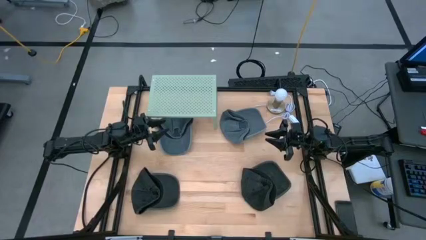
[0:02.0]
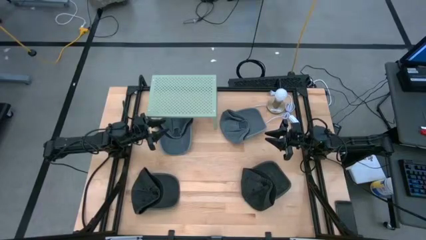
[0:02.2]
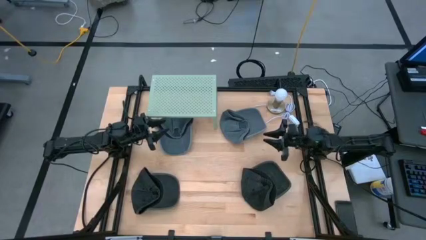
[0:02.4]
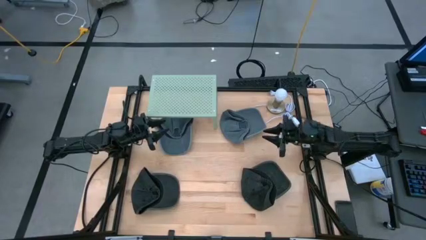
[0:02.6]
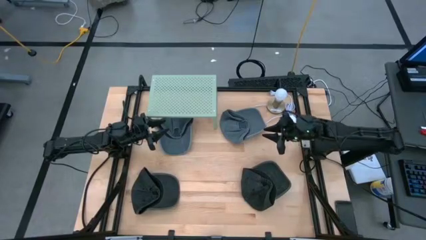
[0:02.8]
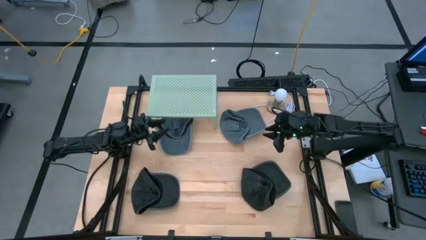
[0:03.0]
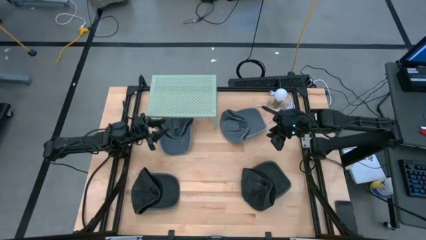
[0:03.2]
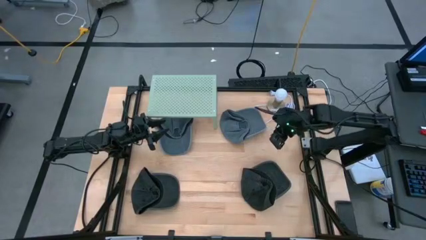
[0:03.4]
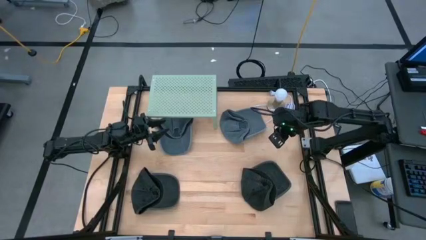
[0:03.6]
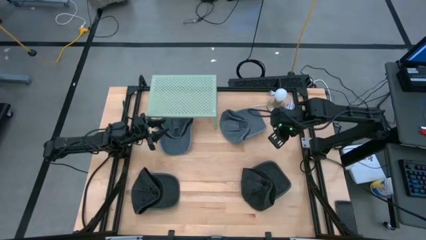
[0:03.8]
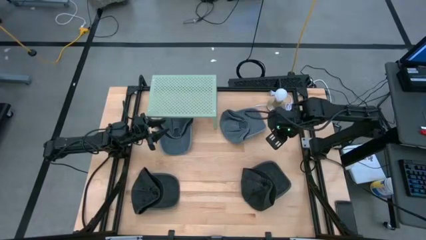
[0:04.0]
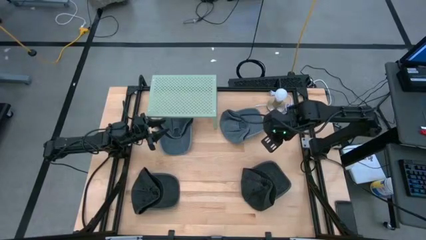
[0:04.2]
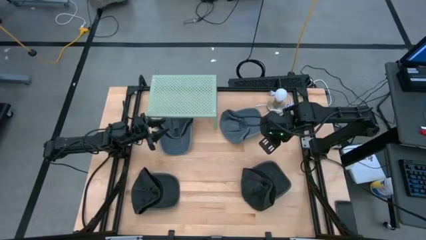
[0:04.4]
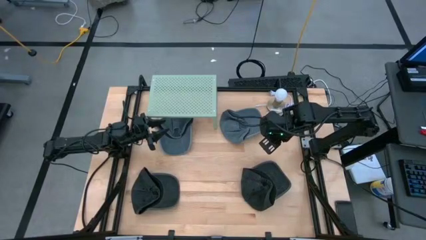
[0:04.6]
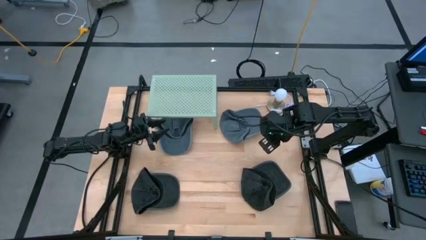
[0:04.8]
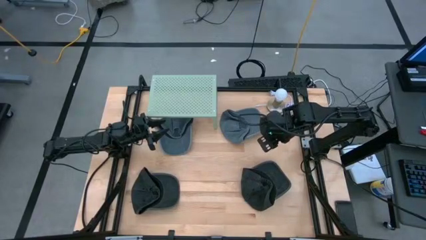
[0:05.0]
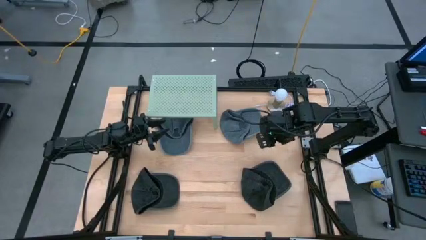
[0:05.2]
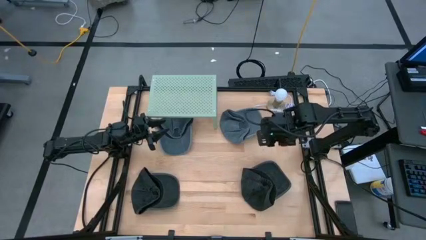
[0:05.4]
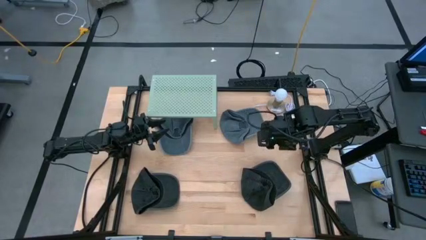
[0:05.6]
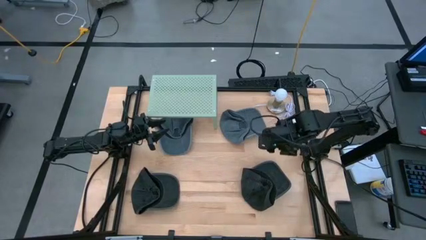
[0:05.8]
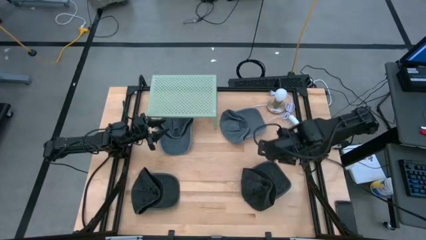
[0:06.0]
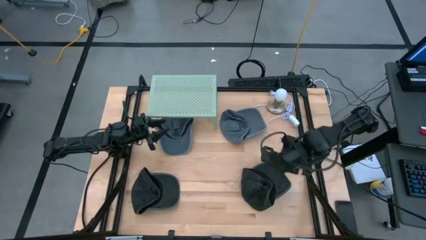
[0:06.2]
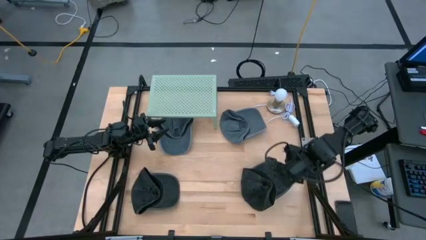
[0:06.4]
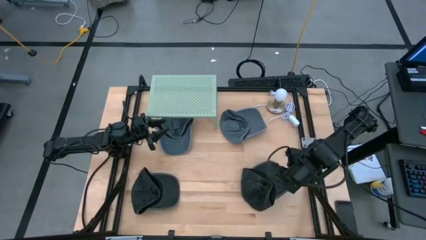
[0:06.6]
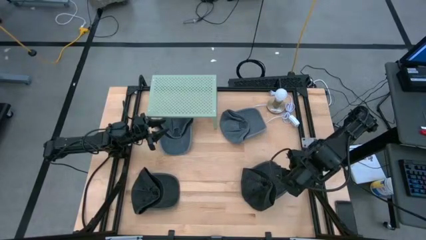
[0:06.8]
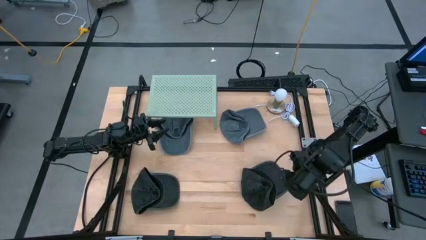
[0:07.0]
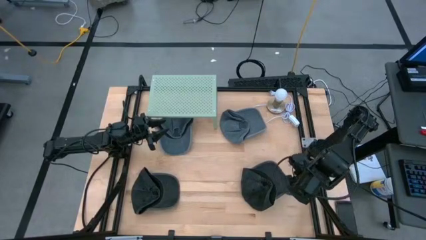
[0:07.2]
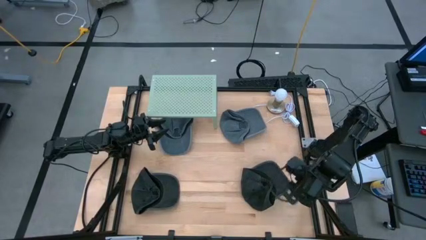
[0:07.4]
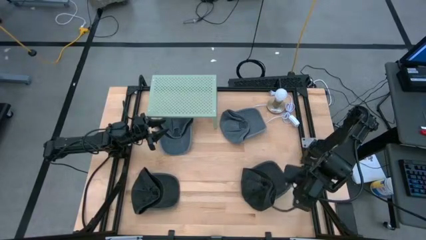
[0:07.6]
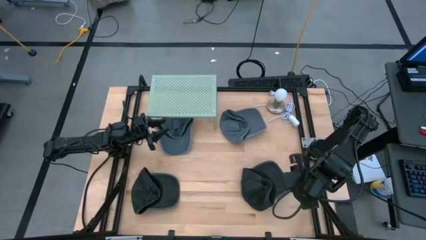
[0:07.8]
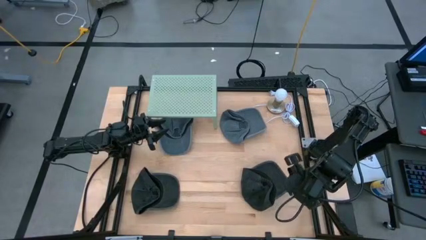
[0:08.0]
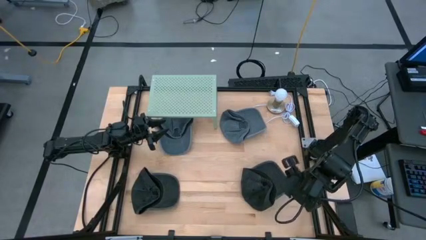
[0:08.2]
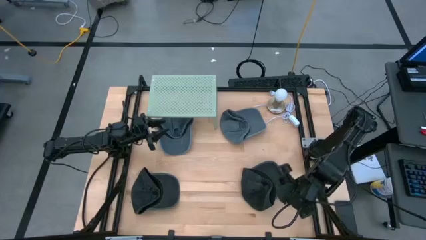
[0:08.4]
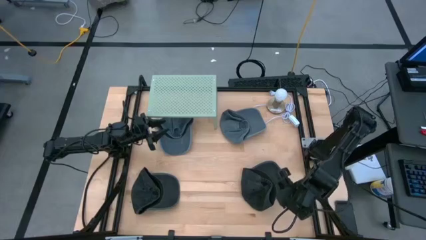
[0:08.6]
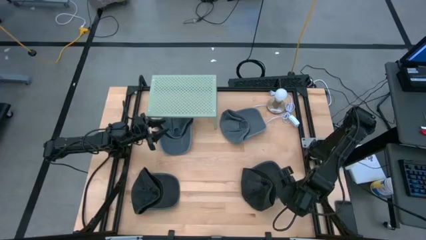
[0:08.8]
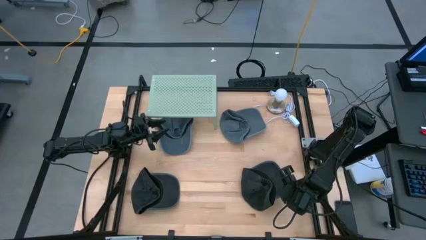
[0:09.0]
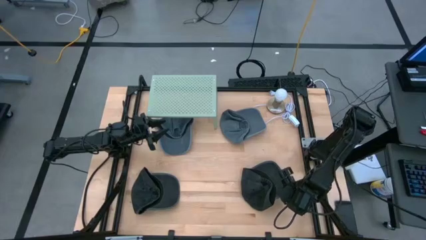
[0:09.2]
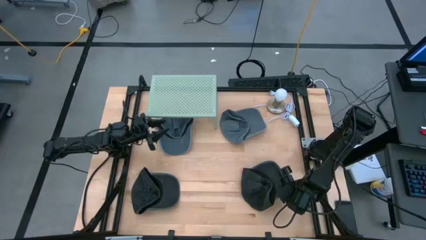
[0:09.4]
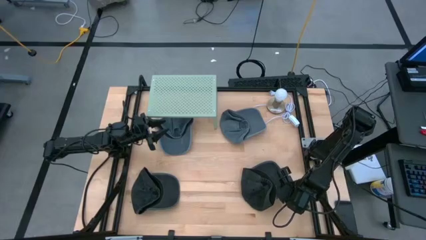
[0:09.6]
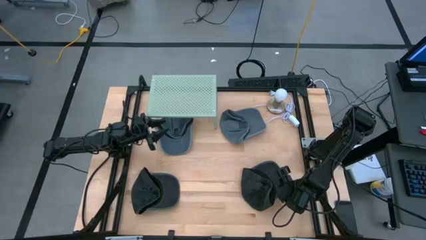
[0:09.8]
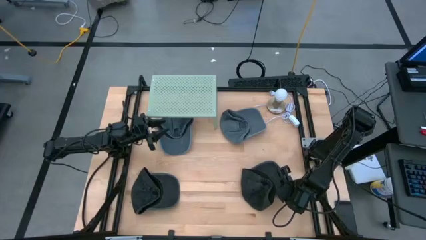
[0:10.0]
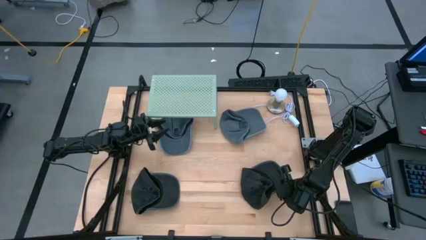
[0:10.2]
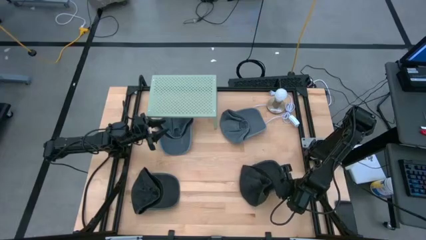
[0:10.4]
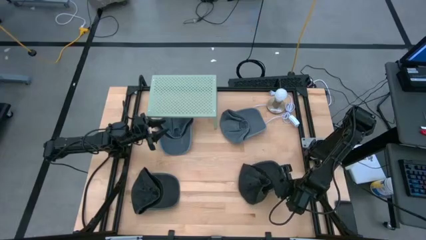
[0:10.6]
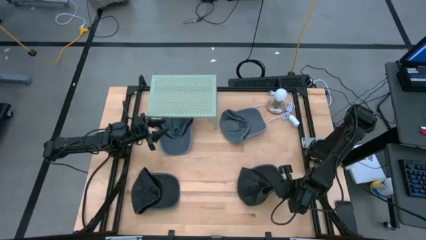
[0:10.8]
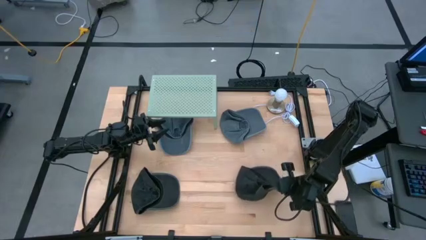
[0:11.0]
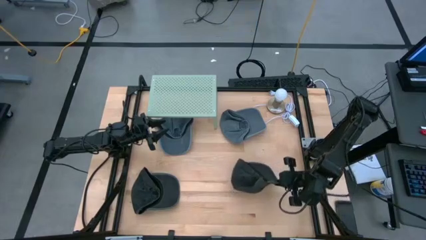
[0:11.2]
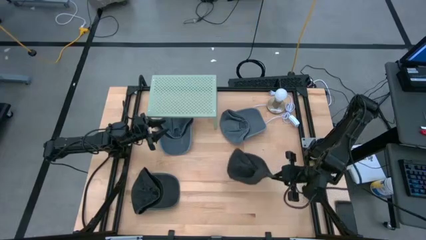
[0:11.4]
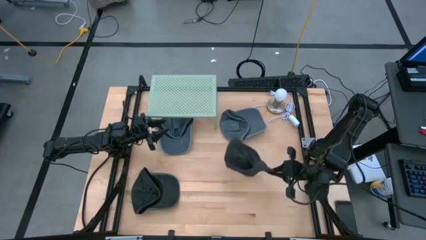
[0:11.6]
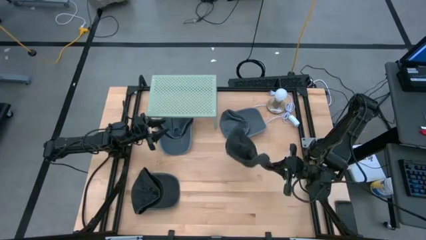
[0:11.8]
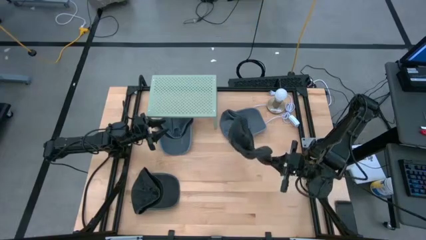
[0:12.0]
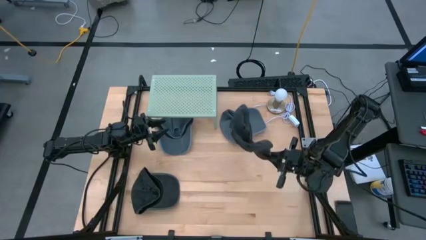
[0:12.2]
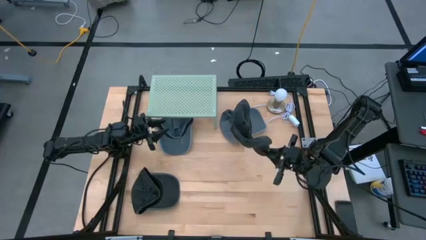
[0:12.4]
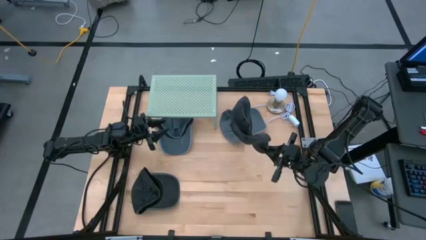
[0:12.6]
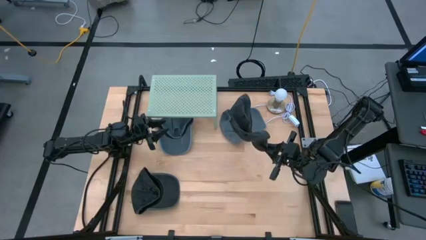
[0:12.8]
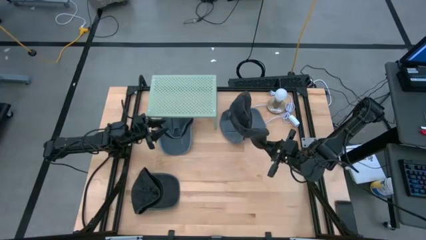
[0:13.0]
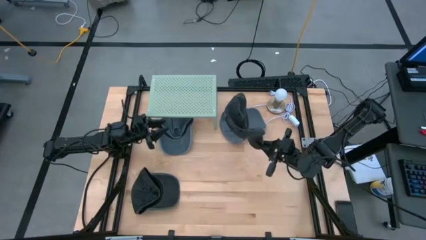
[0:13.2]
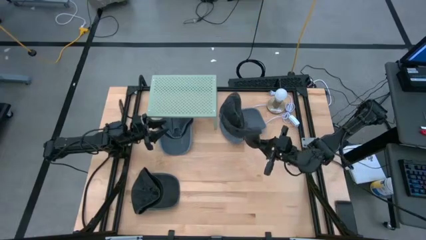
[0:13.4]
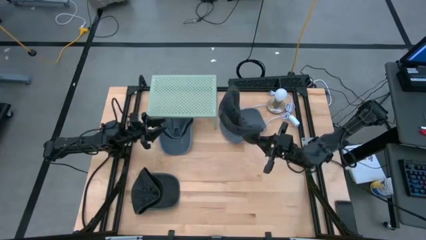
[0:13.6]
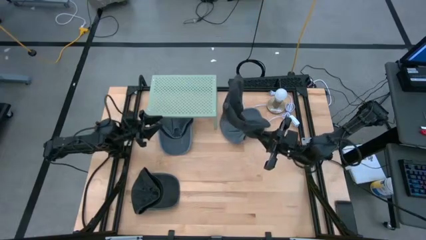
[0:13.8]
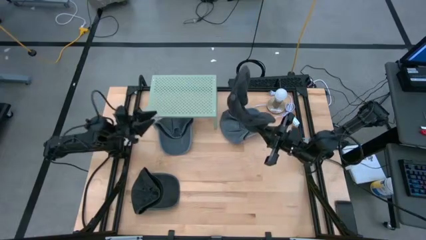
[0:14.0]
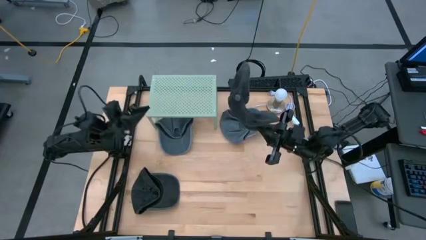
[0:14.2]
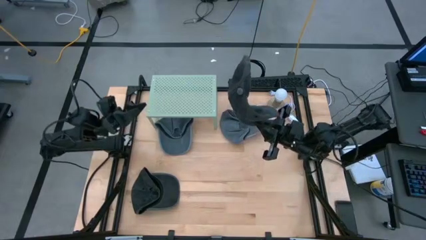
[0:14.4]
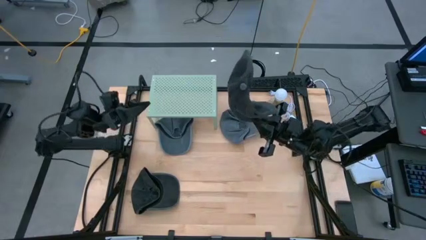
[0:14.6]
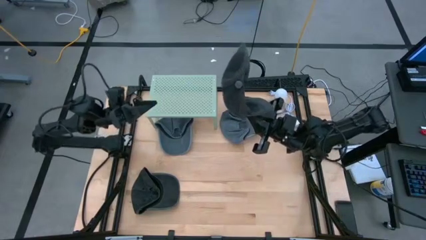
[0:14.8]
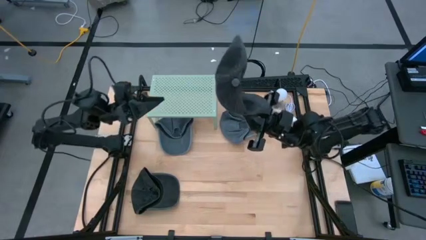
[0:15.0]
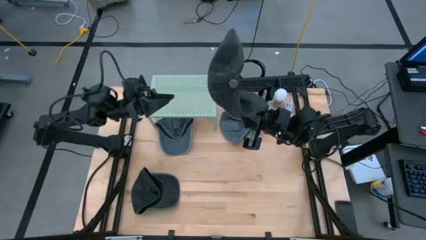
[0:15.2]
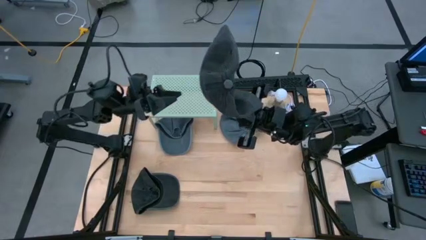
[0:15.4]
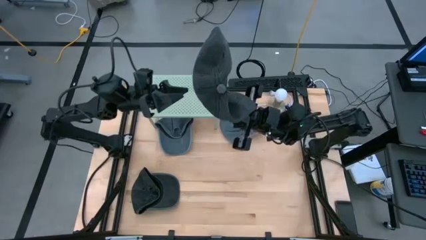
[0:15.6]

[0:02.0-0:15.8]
Task: Pick & Place hat
Put the black cap on the shelf

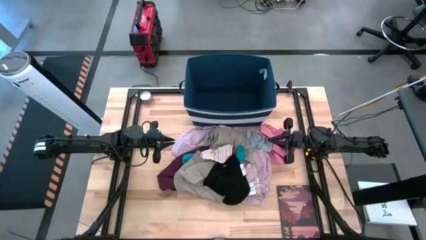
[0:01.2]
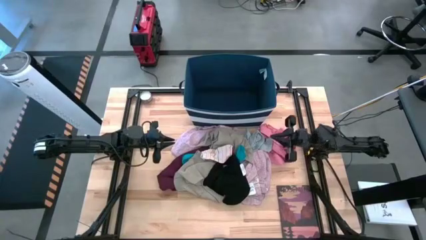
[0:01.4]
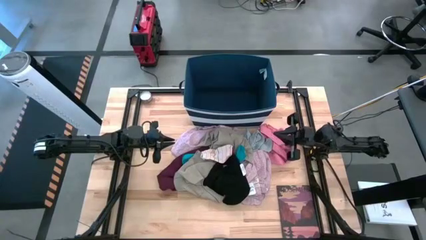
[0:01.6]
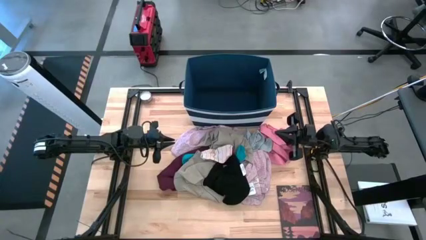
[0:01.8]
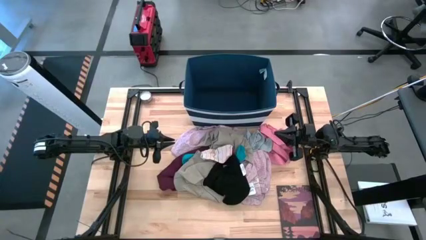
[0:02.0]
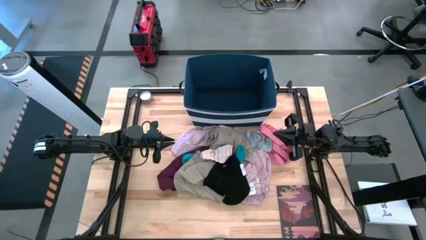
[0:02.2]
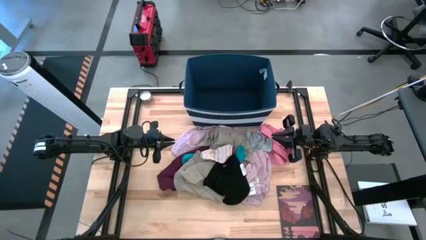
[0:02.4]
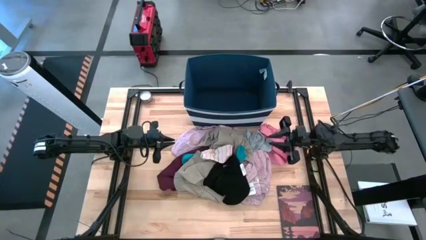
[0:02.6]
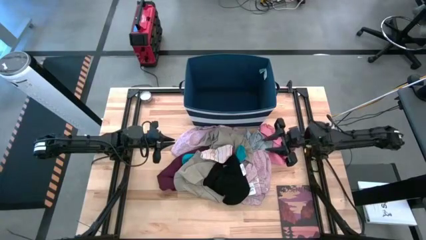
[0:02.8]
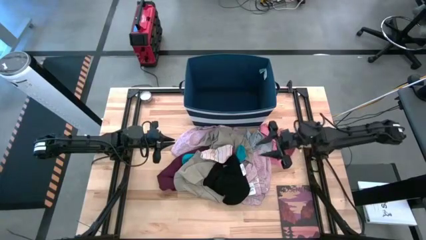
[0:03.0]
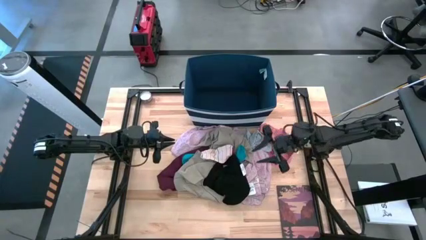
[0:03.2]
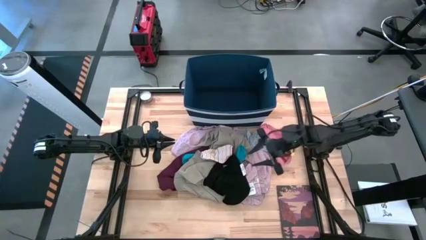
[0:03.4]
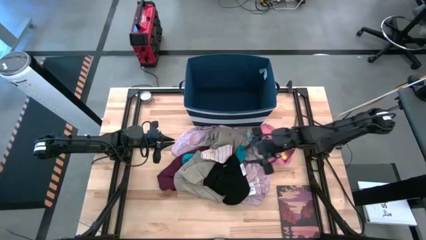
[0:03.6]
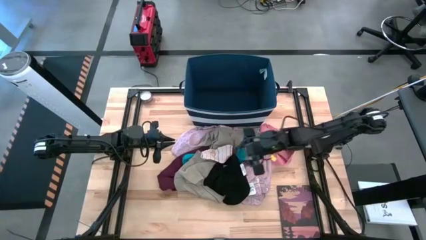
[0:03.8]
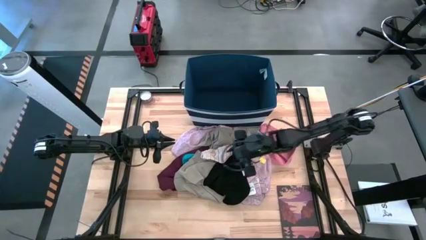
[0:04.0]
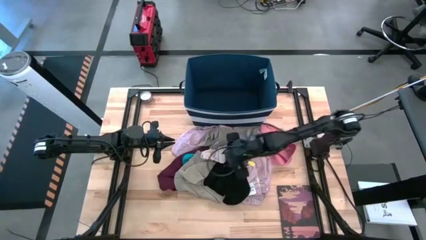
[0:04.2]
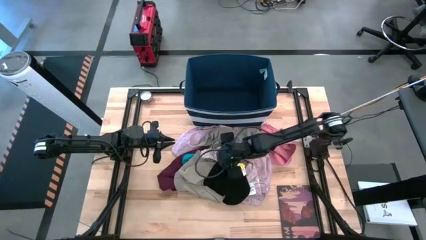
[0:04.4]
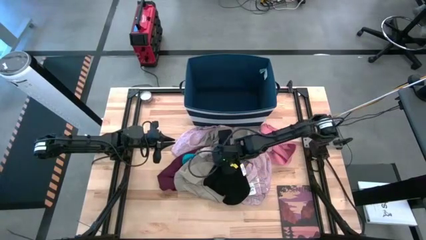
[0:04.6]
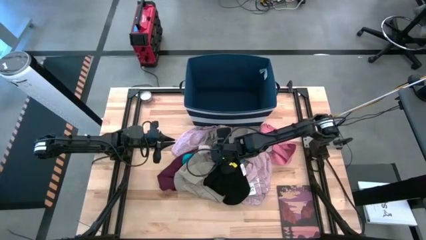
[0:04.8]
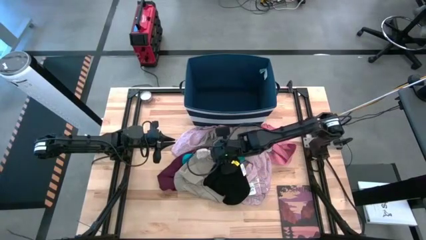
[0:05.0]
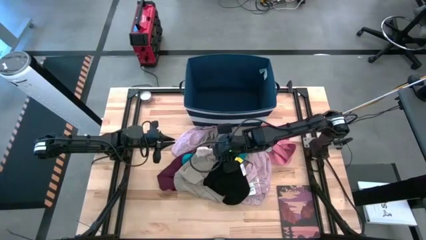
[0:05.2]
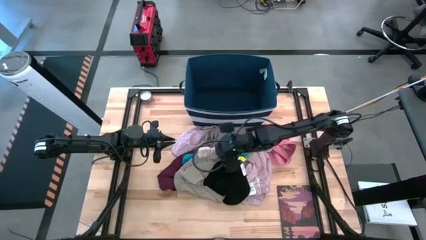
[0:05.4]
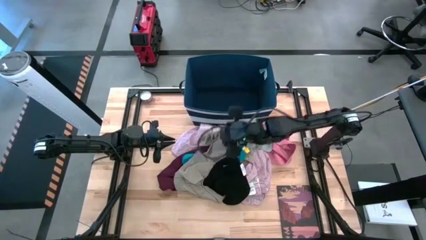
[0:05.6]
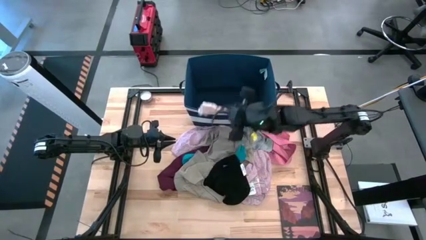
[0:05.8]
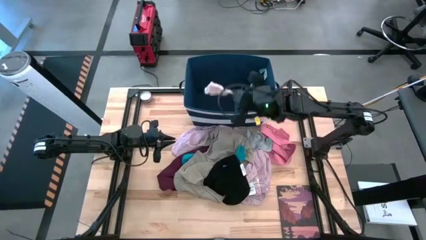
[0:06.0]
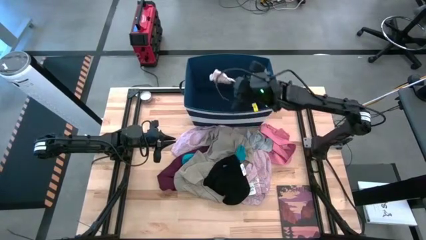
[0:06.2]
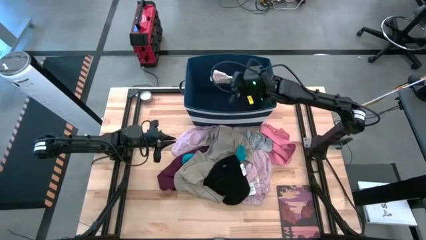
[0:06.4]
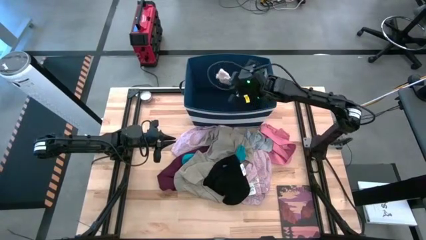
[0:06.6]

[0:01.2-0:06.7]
Task: Sort clothes
Put the striped sock into the blue laundry organizer
